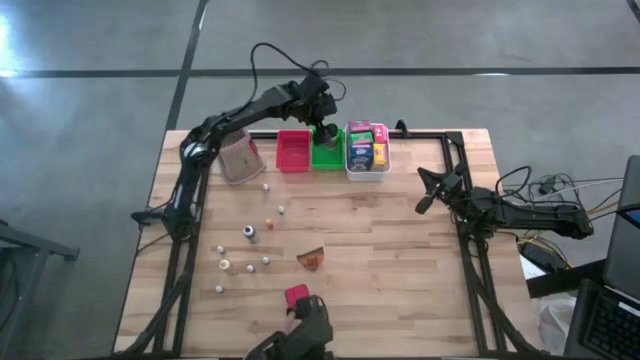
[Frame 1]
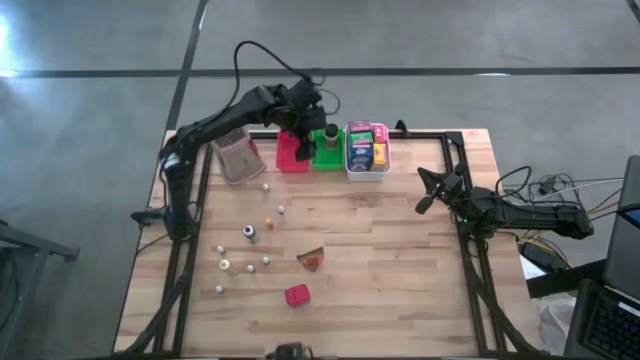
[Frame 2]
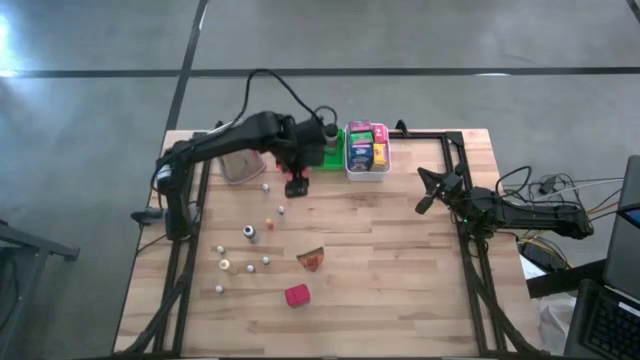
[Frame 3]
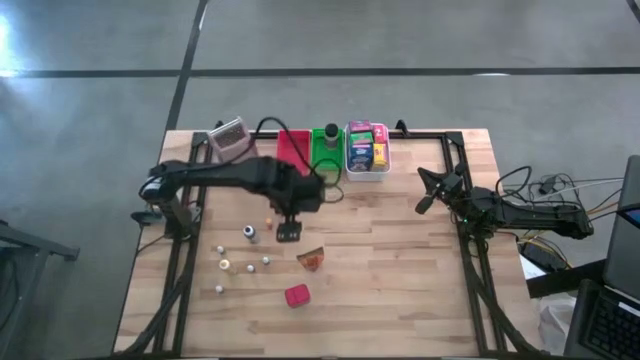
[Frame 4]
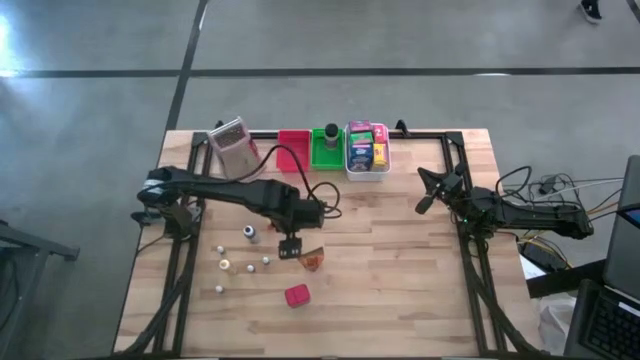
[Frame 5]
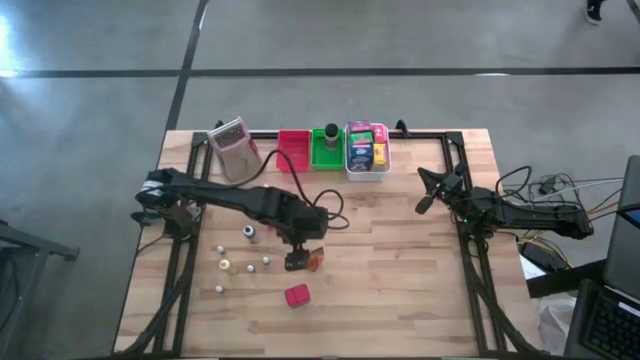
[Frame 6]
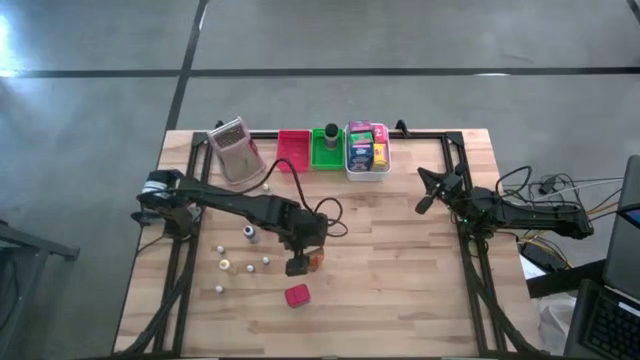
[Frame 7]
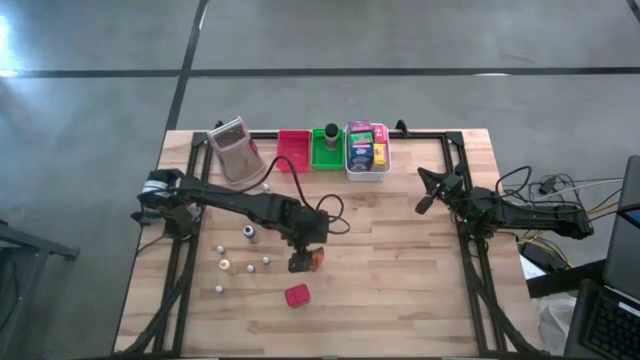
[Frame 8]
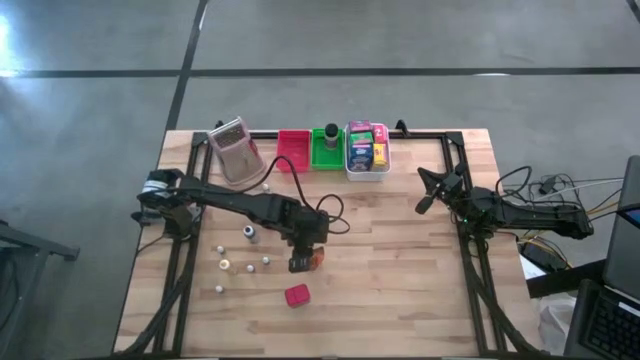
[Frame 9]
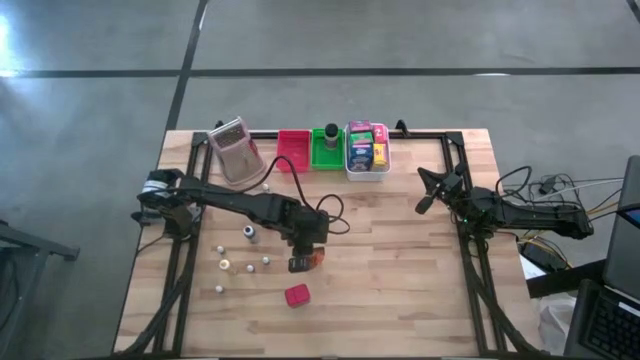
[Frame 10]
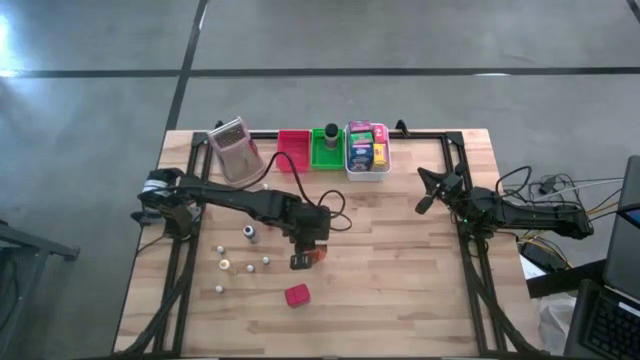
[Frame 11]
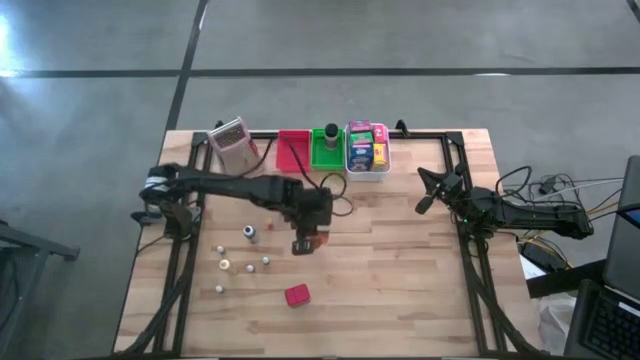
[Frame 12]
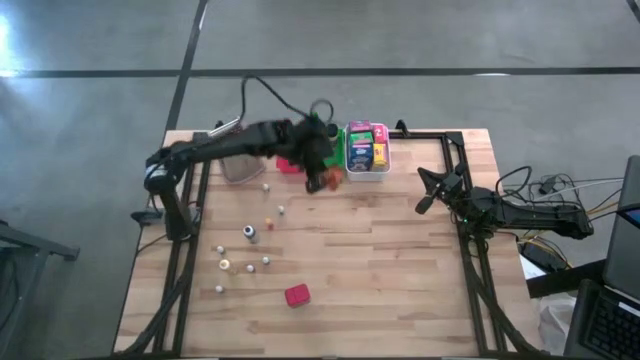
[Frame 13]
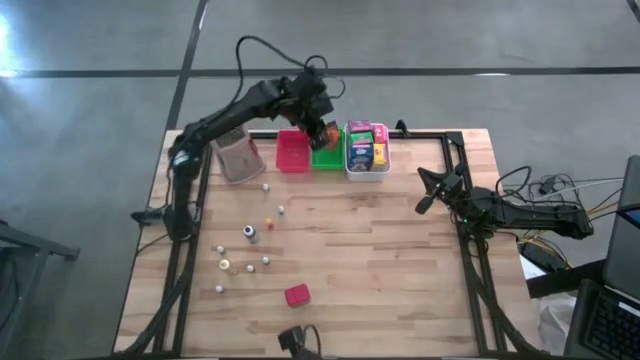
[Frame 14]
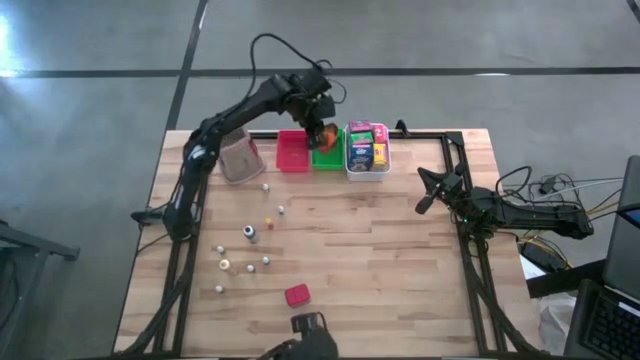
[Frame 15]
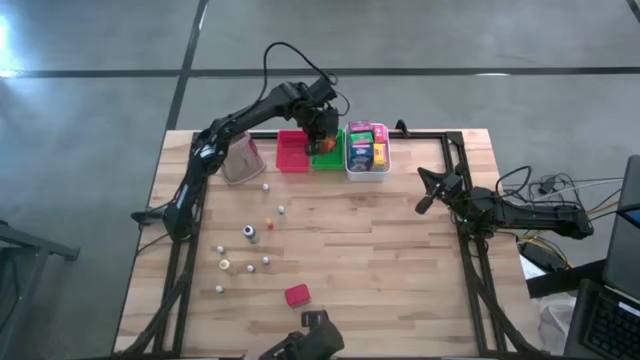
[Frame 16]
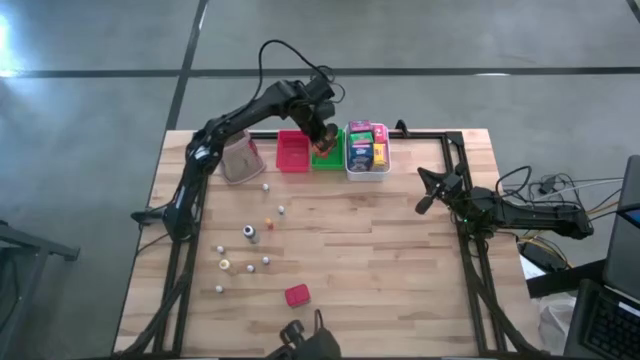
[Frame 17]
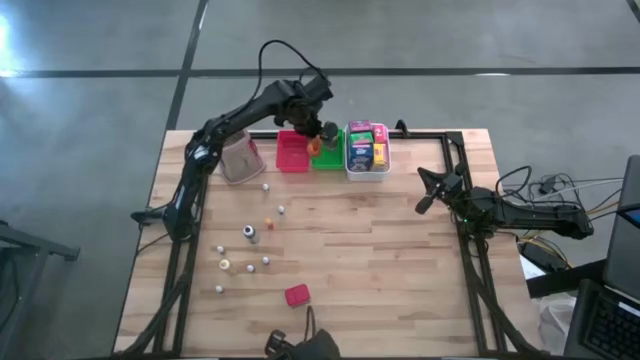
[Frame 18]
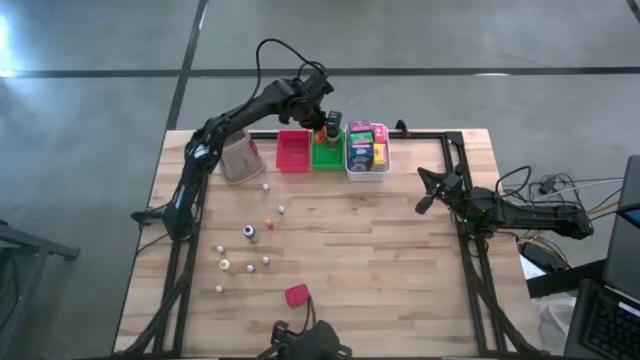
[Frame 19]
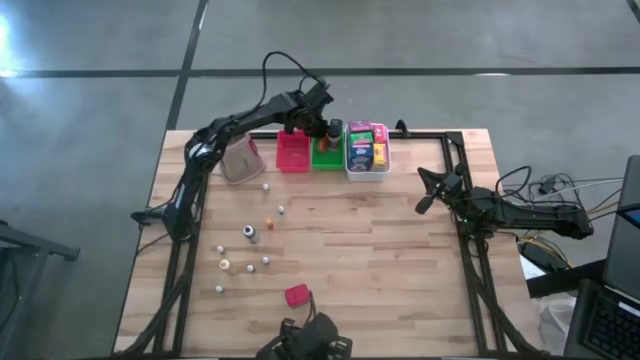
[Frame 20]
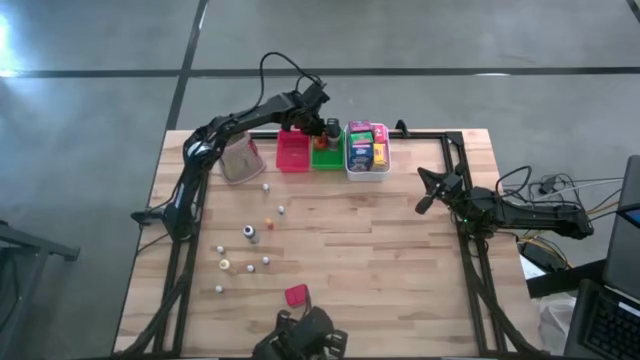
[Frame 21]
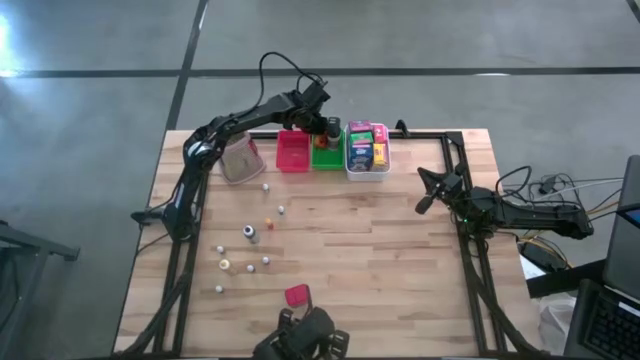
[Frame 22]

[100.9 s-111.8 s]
Task: Pick & Place Kitchen Items
Put the orange seasoning pack into the green bin

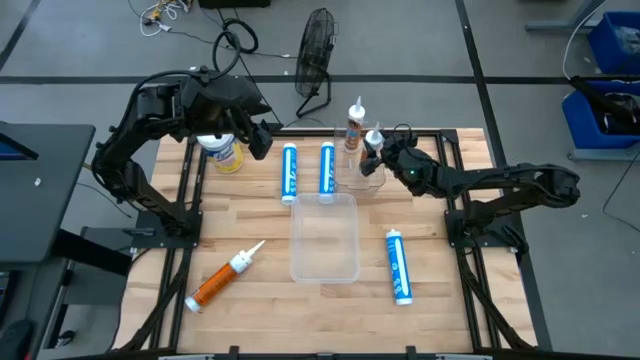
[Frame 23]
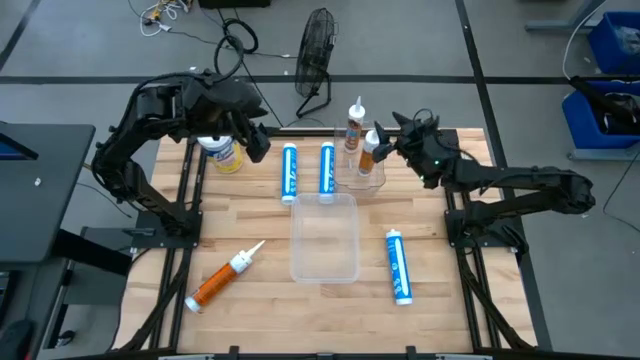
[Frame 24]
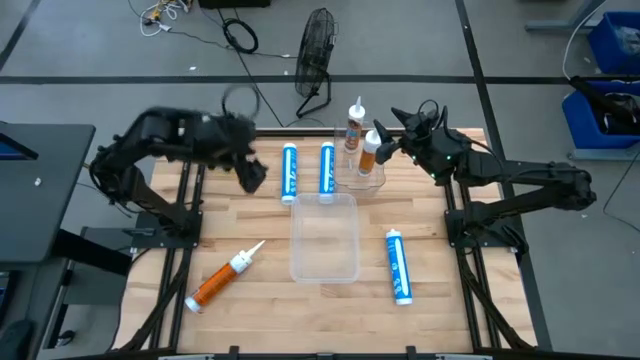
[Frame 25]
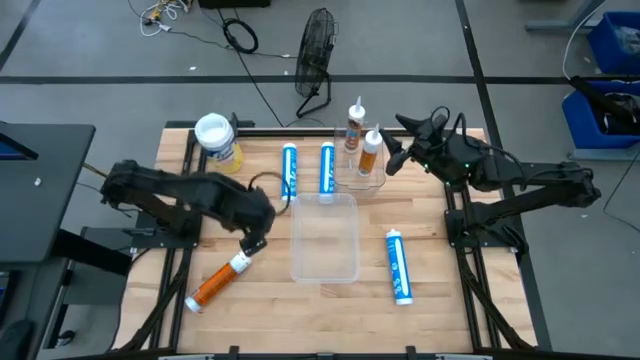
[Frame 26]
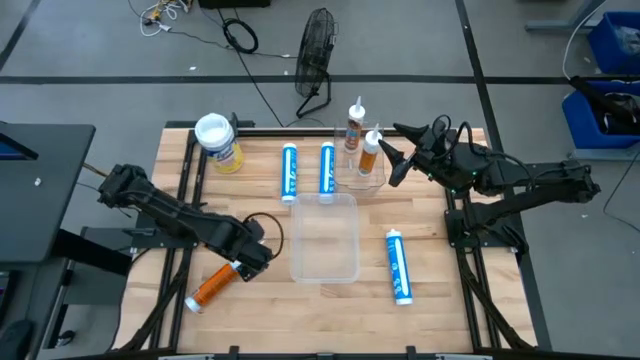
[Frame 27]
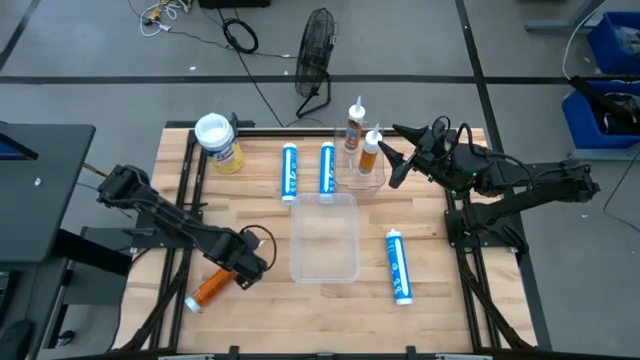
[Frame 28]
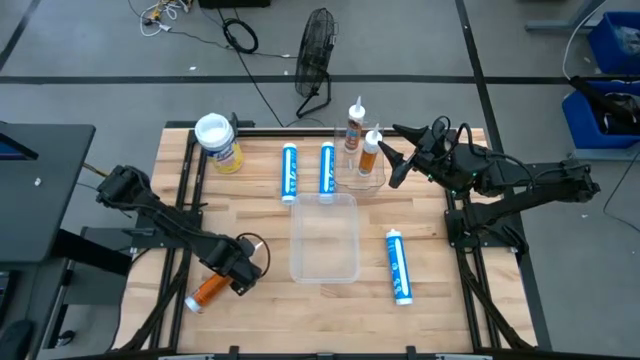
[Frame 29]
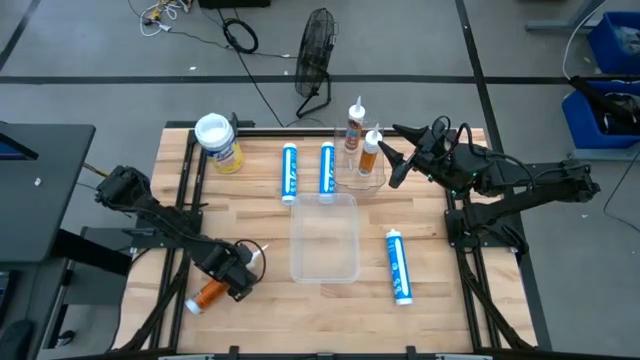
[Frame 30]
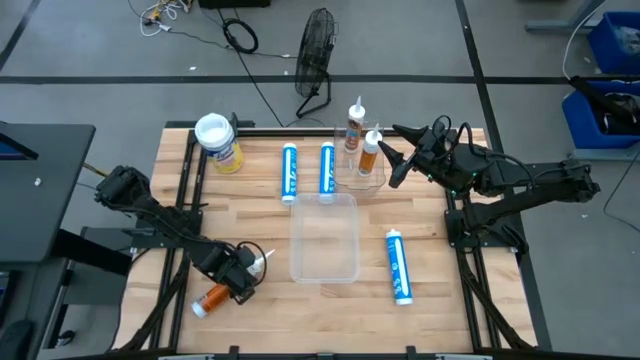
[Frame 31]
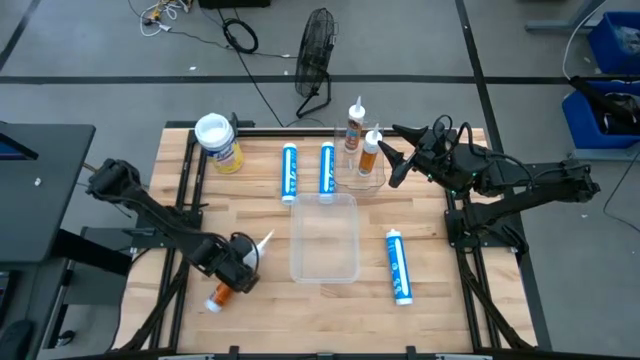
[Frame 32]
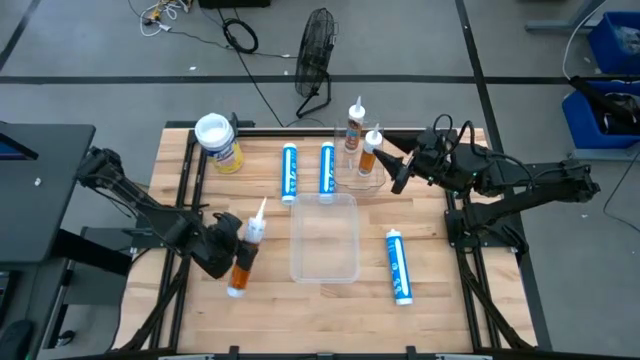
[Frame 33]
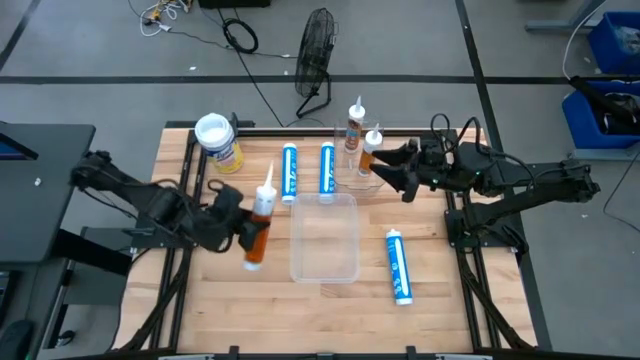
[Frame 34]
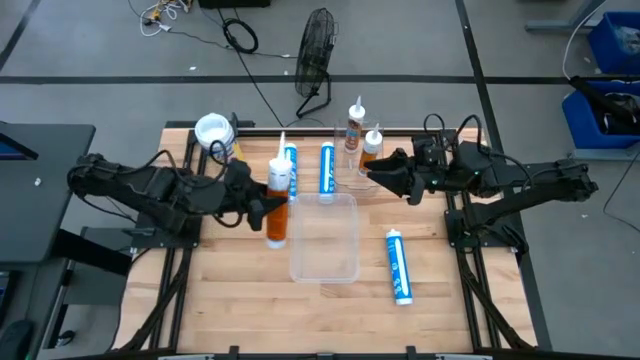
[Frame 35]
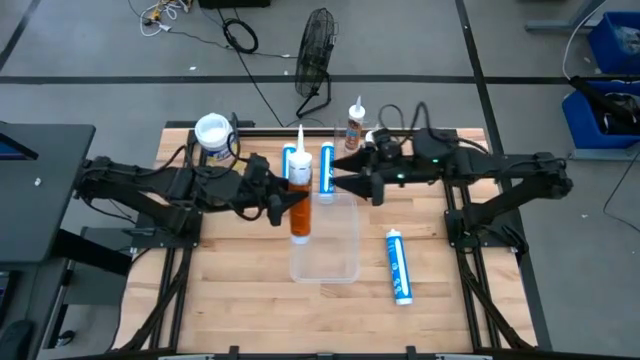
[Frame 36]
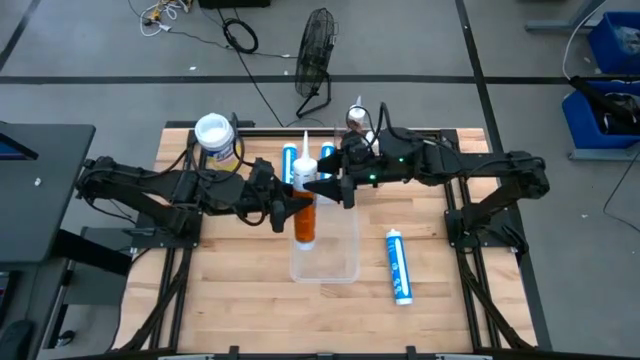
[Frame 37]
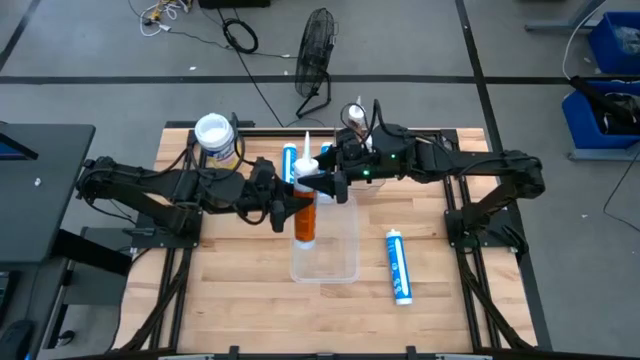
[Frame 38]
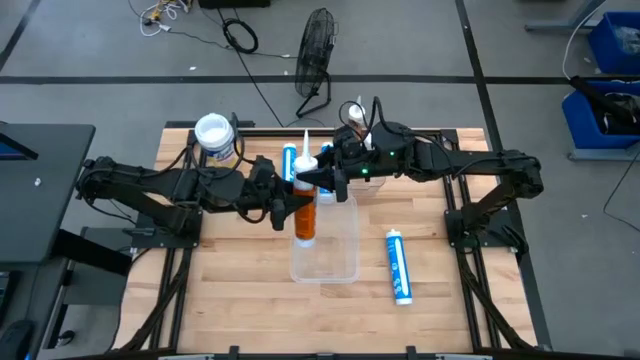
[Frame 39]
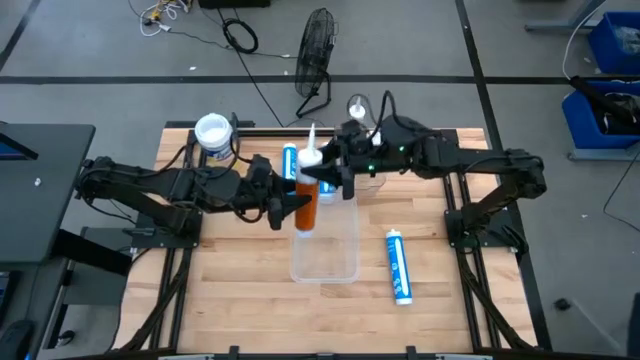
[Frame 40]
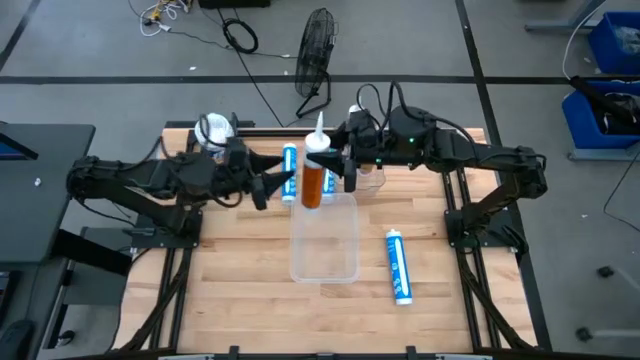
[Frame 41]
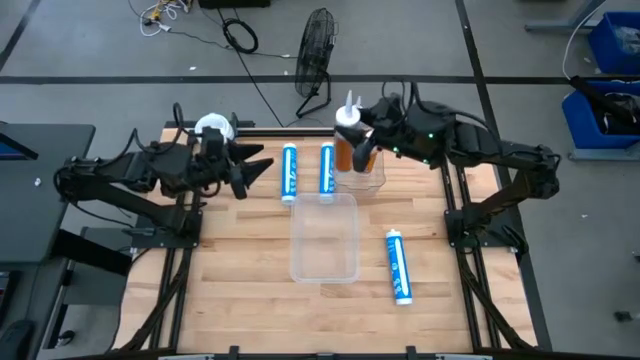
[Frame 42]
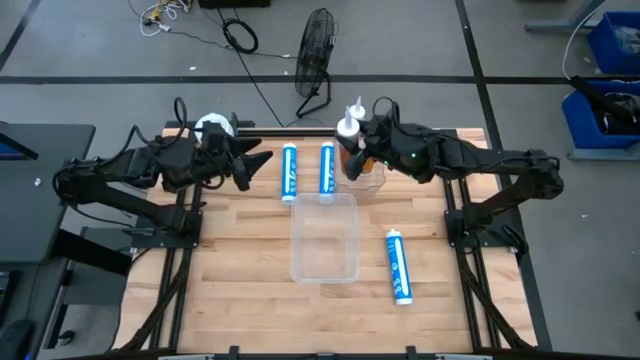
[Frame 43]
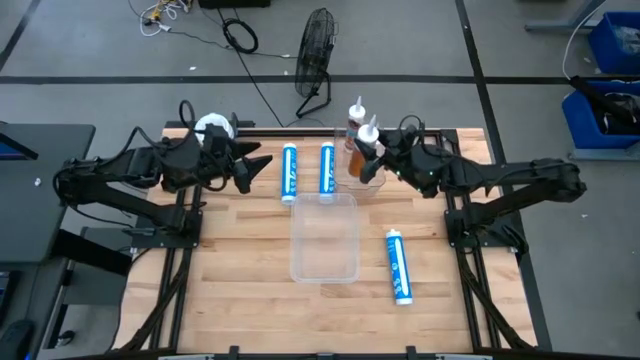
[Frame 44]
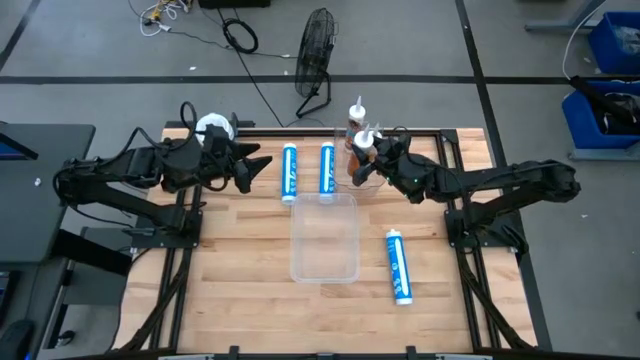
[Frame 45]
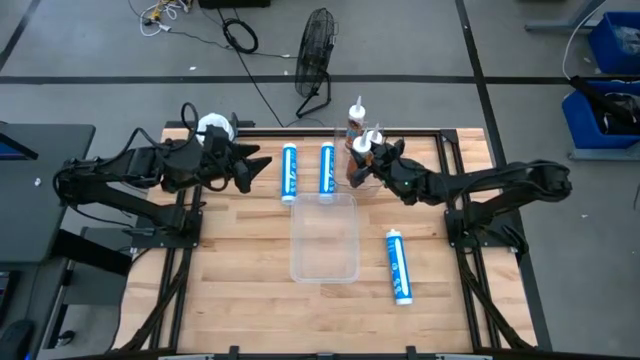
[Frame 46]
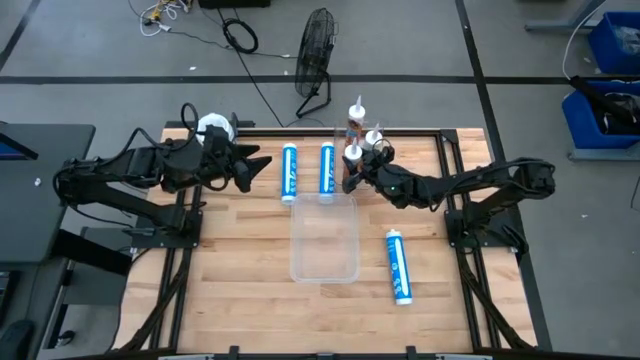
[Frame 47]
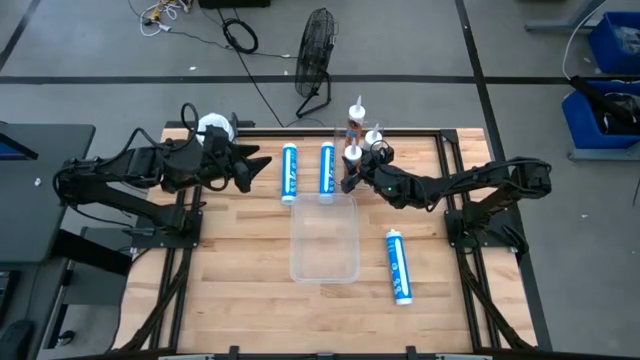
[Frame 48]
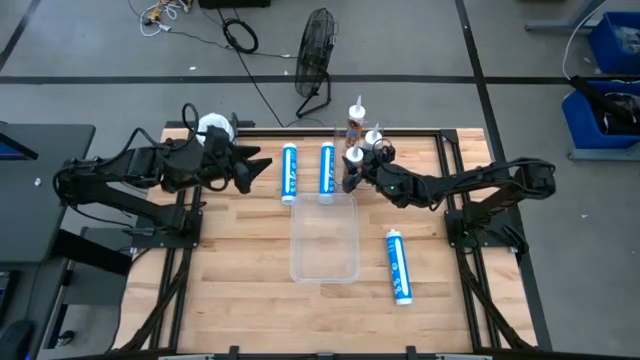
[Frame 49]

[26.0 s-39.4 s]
Task: Sort silicone sealant tubes
Put the orange sealant into the top transparent bin
